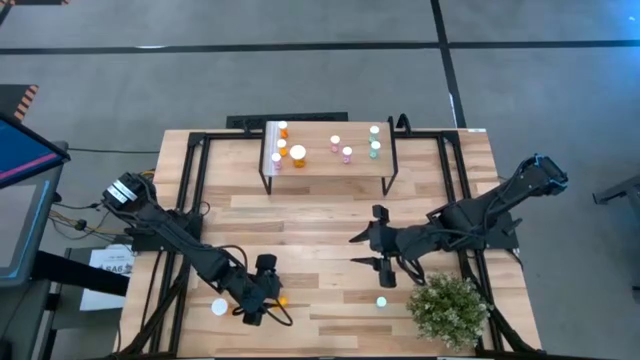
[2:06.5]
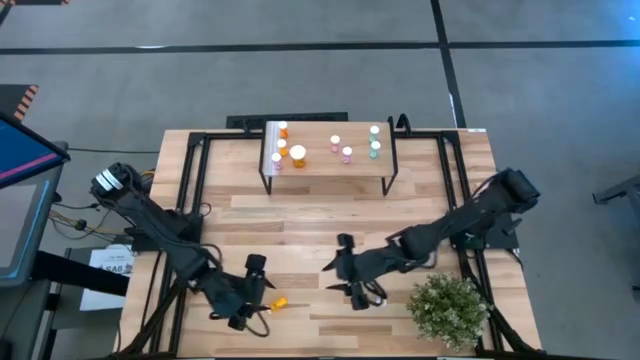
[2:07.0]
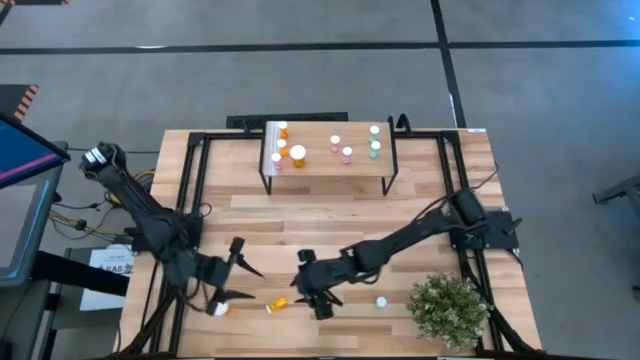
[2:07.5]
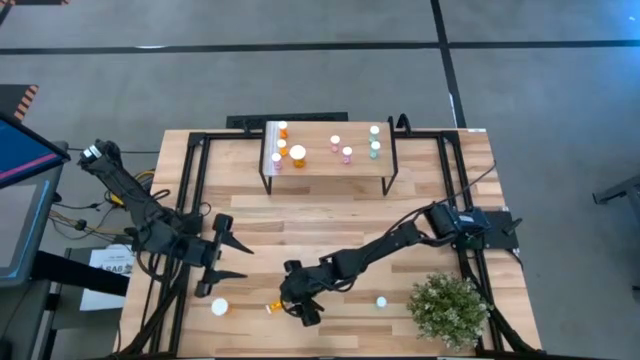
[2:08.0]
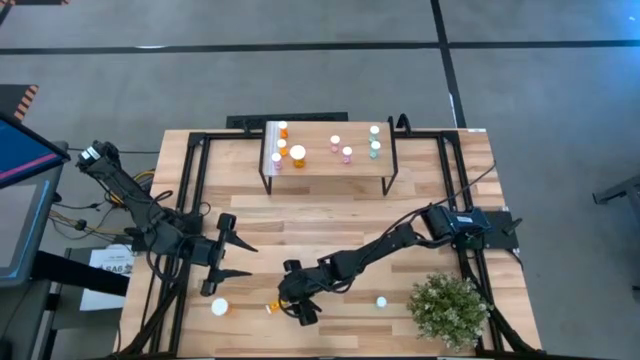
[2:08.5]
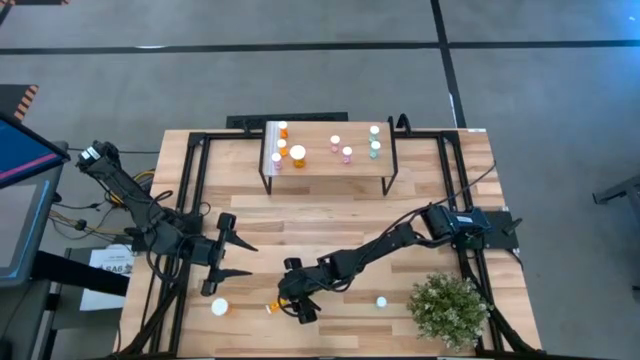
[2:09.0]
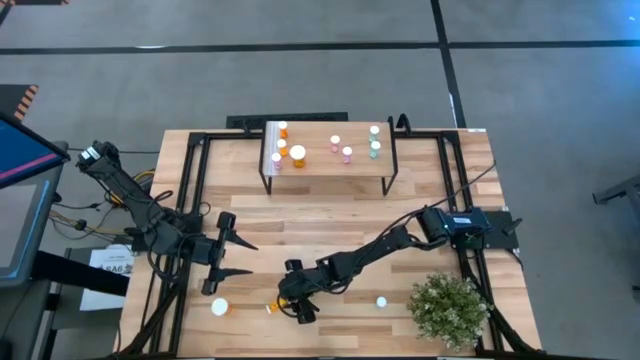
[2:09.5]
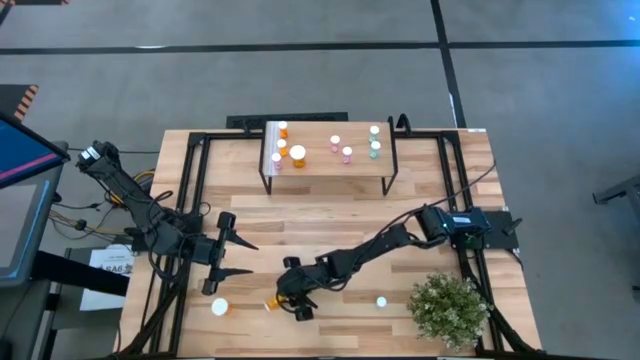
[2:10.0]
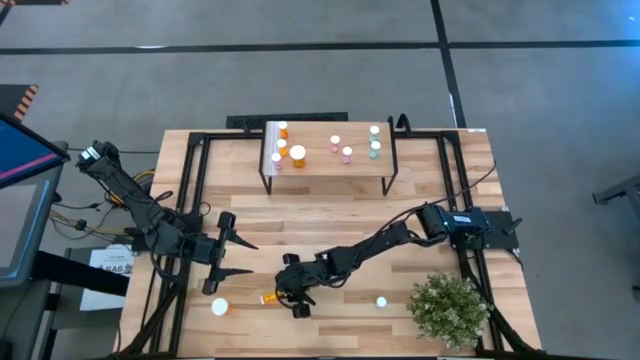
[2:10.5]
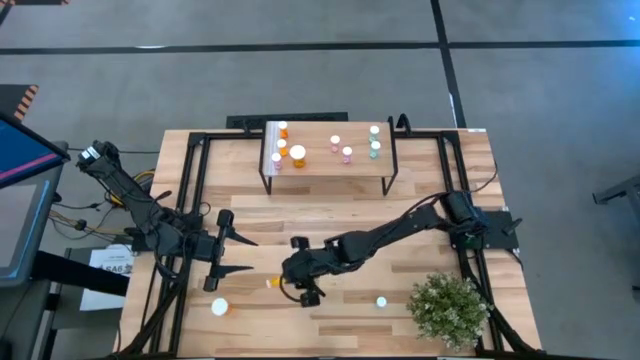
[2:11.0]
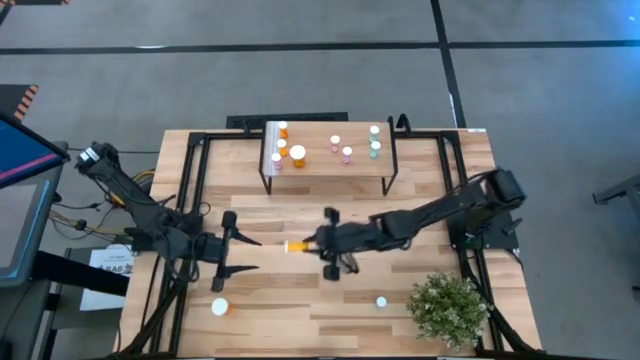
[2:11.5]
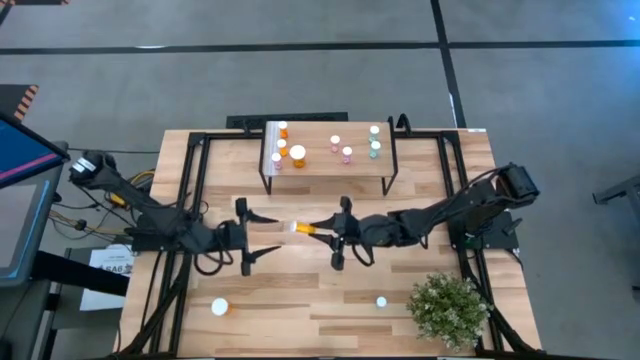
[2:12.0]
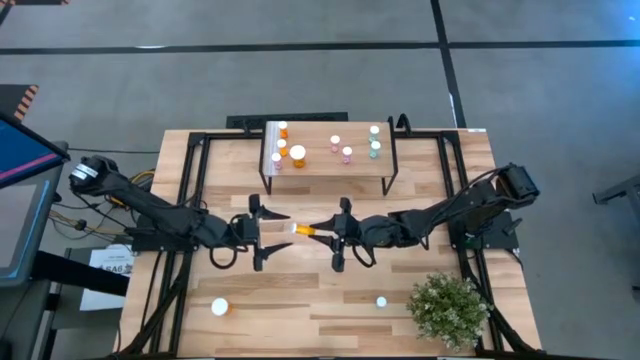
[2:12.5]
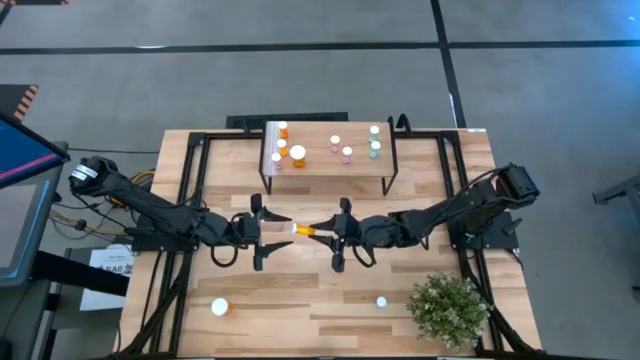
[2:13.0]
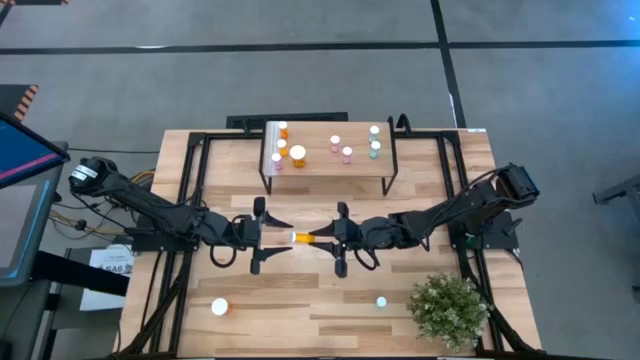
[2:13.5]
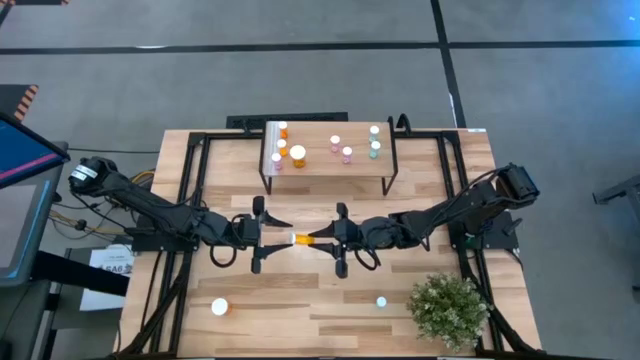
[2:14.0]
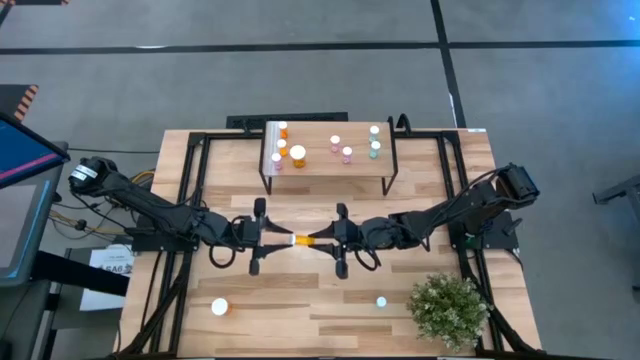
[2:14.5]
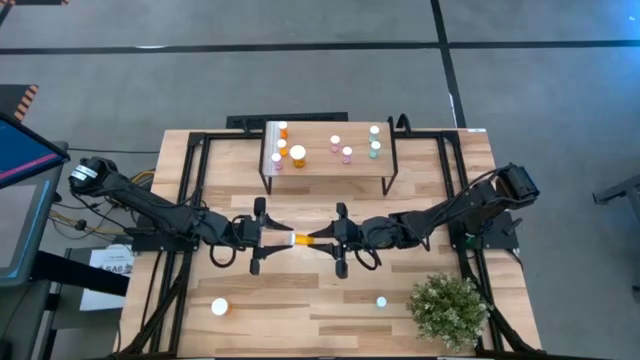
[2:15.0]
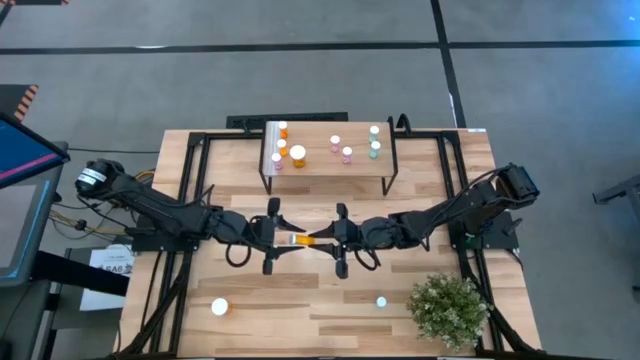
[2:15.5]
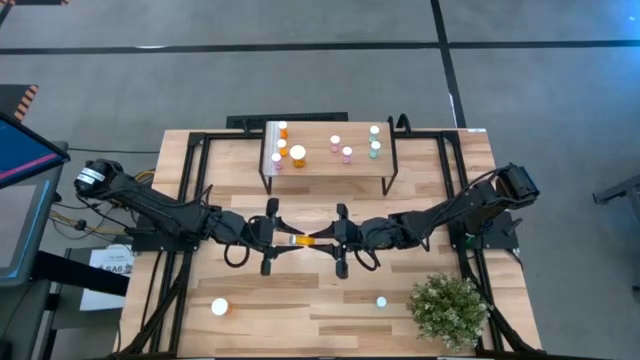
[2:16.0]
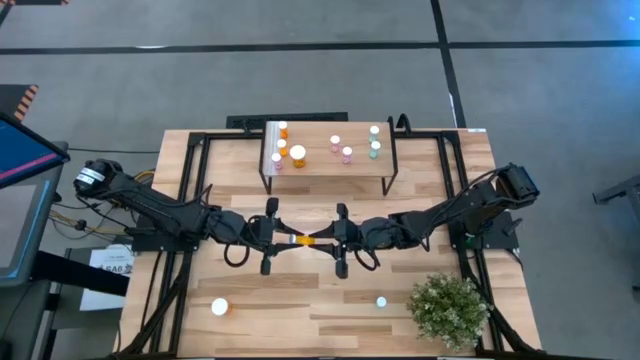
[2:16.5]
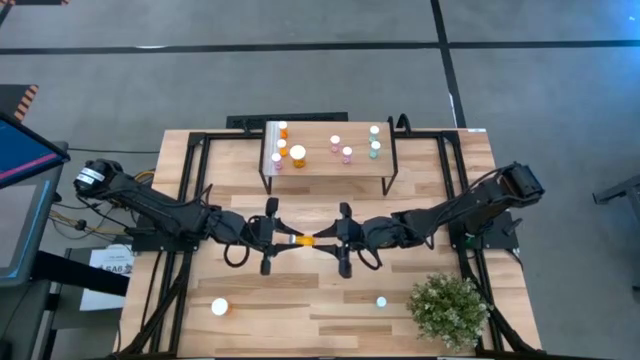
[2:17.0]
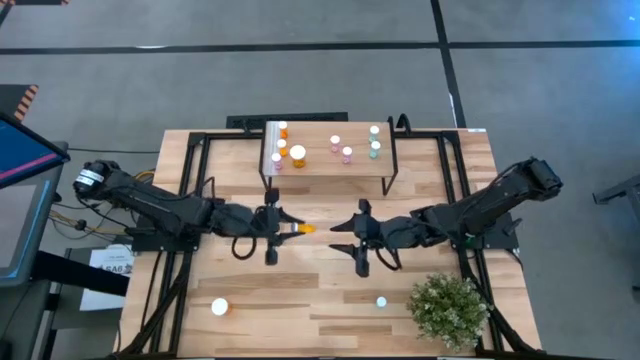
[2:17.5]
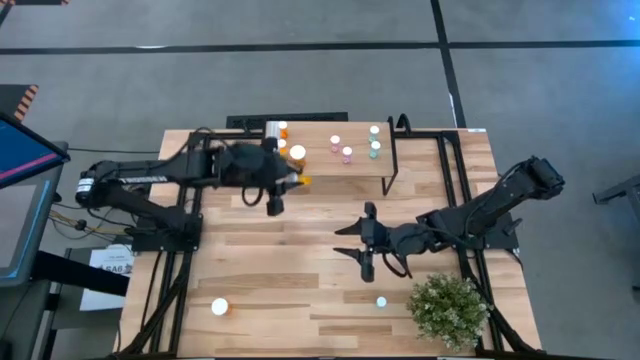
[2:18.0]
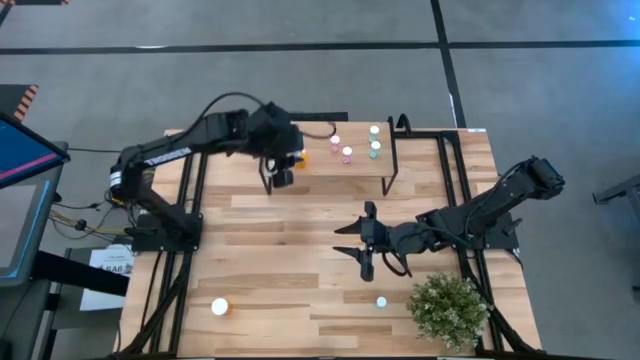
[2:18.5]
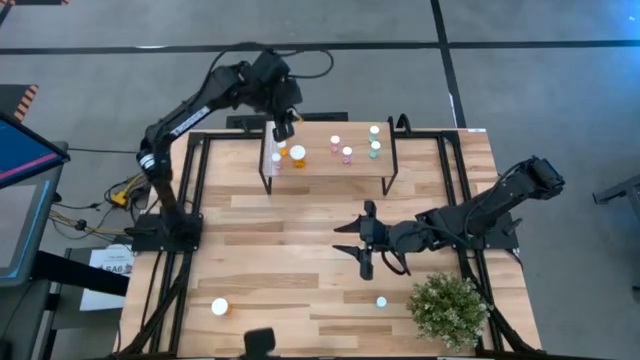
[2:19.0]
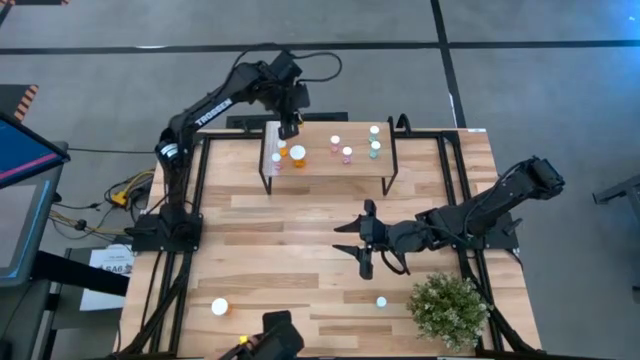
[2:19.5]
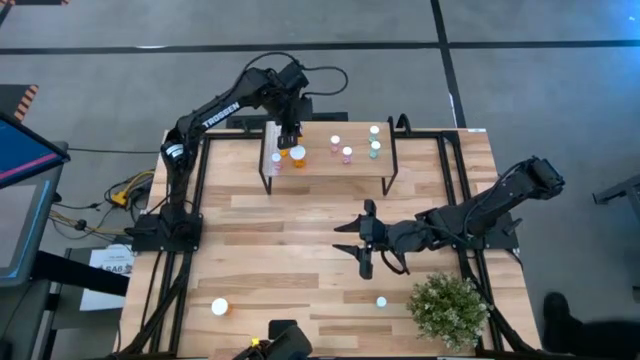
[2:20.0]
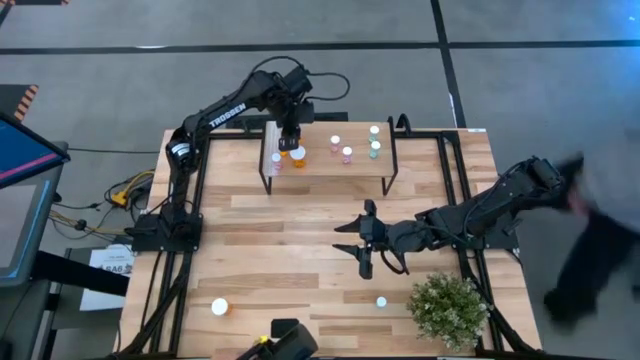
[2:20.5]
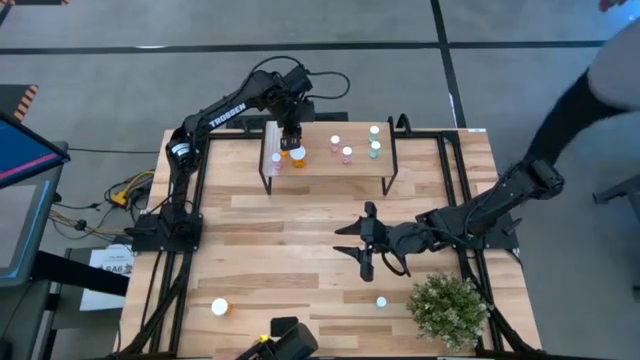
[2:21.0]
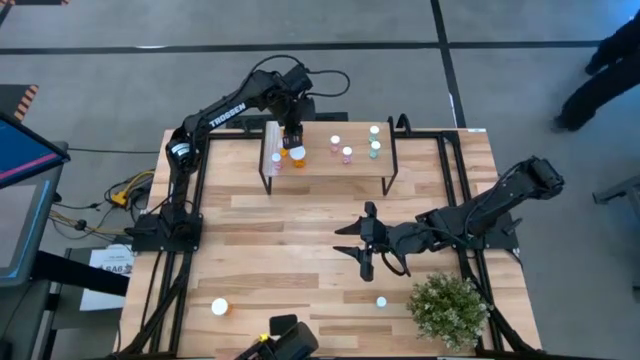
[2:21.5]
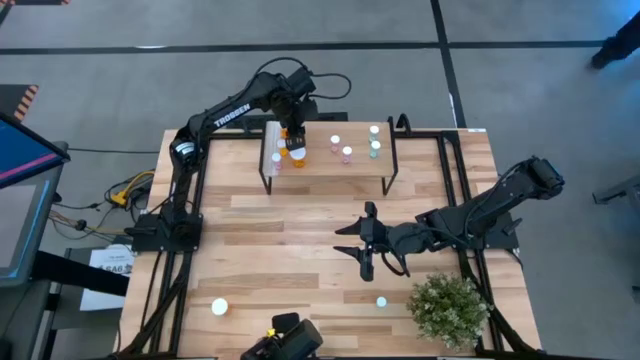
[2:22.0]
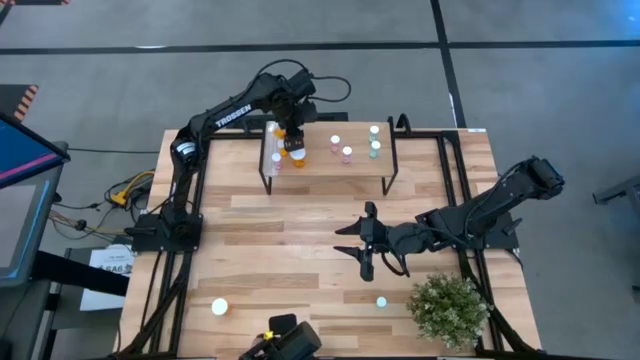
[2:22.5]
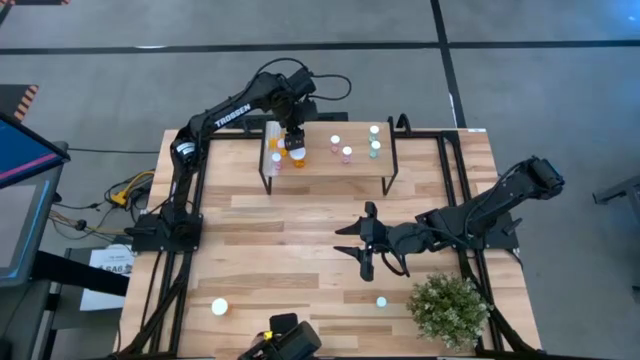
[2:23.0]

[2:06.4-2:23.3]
Task: Pick and place medicine bottles onto shelf by color
Put the small orange pill bottle on the shelf

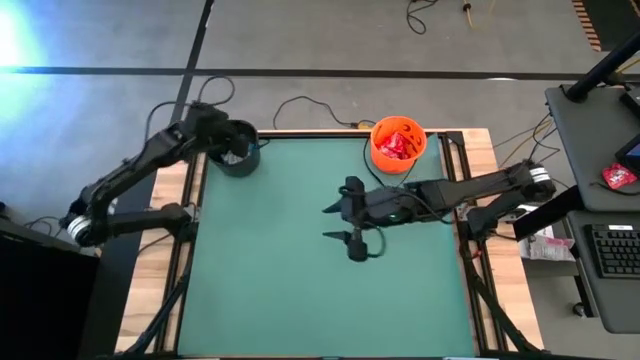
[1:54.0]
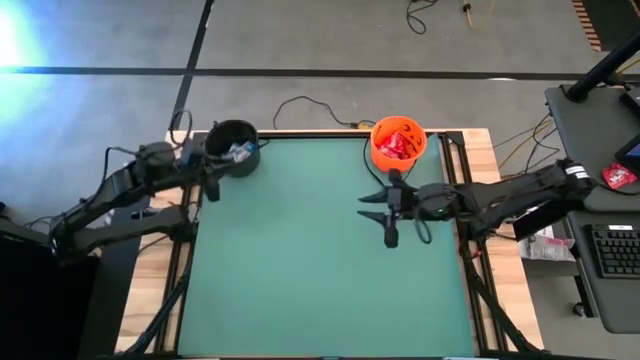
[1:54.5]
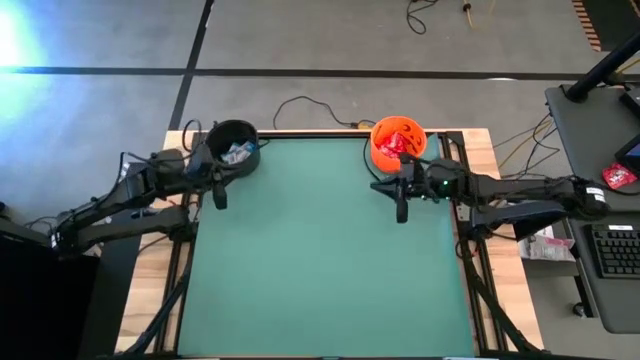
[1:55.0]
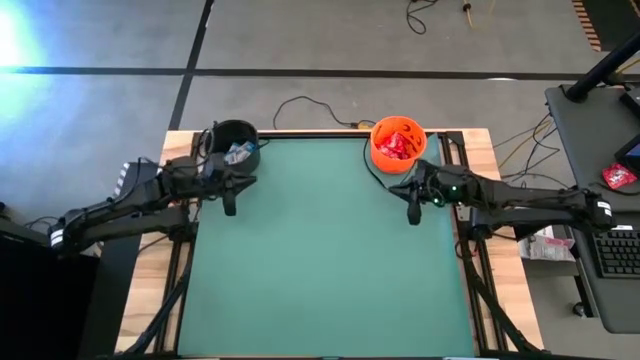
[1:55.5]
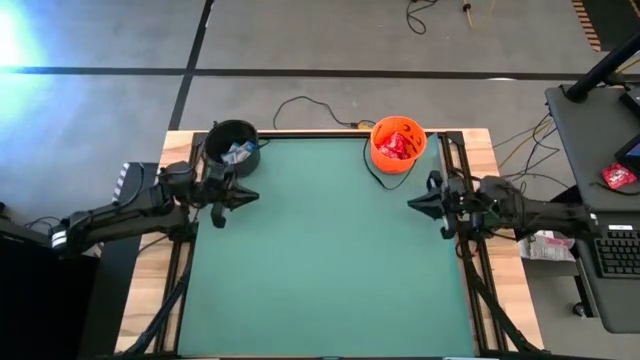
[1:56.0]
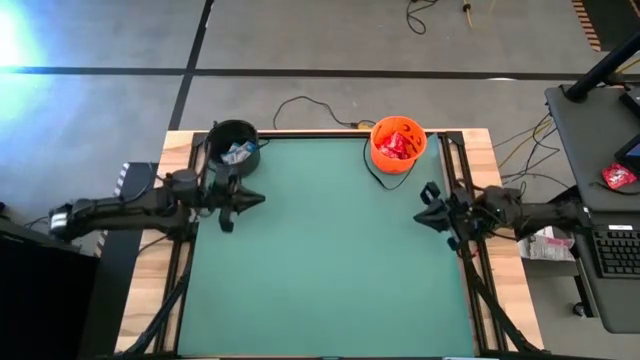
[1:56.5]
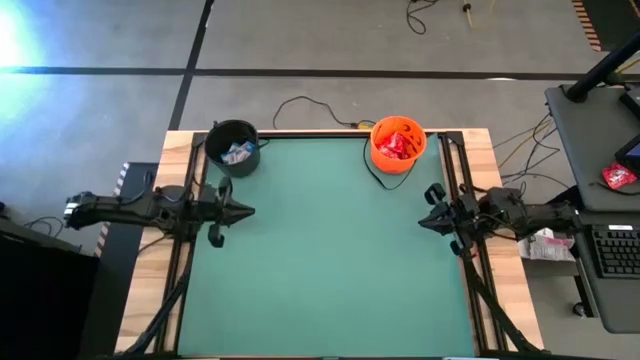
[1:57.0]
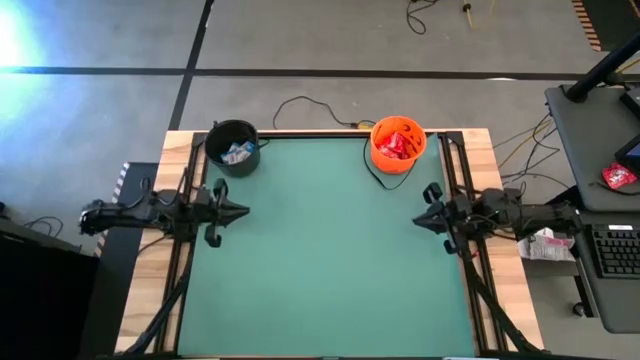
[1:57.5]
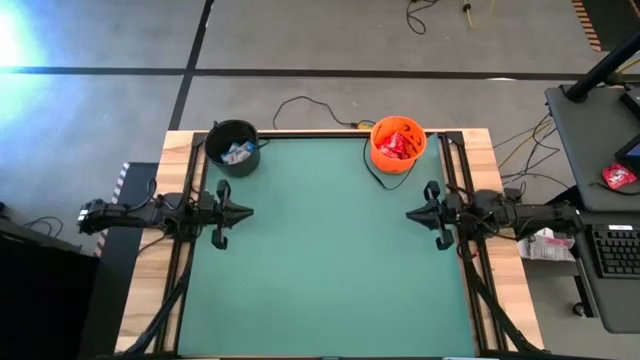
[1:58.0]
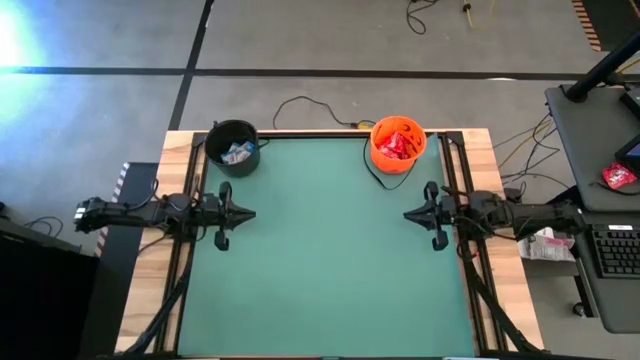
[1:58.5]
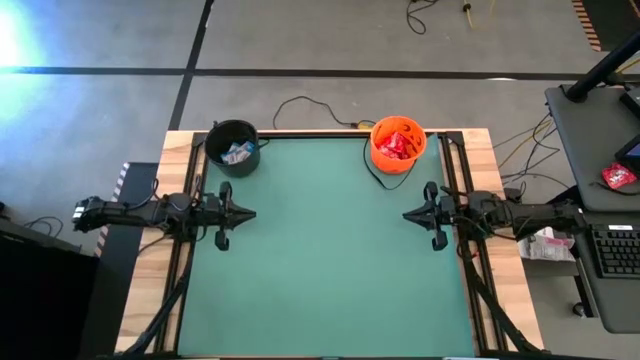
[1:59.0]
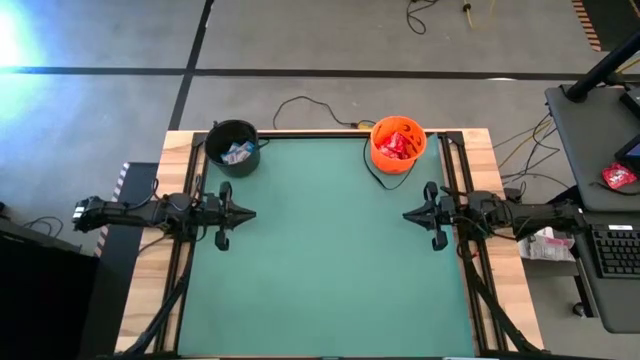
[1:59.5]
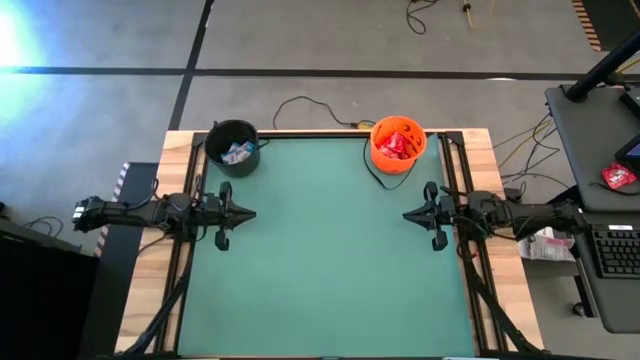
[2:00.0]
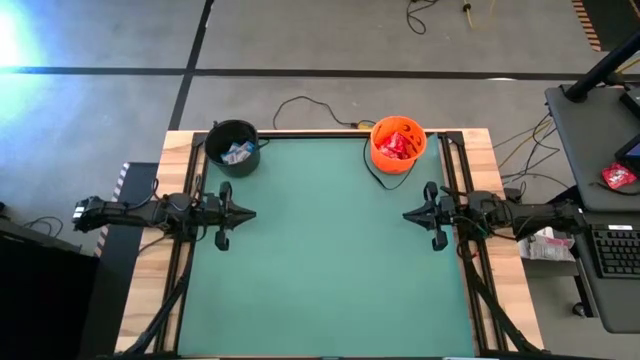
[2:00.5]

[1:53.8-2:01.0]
Task: Sort candy by brand, put in halloween buckets
Return to Home Position
